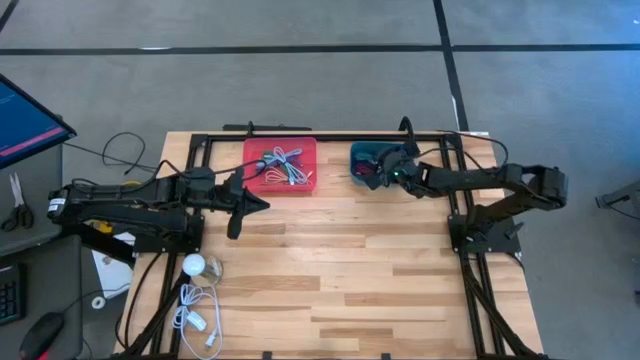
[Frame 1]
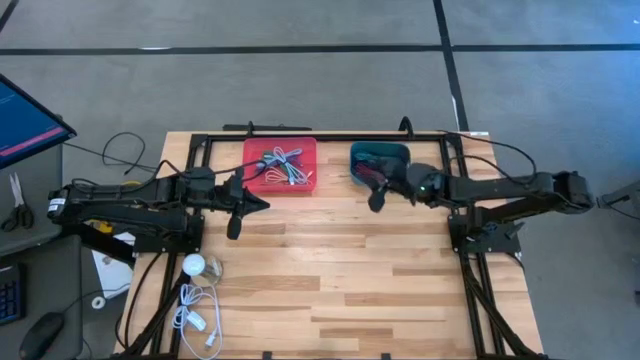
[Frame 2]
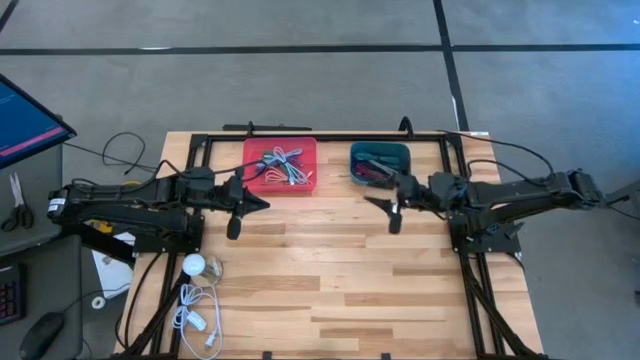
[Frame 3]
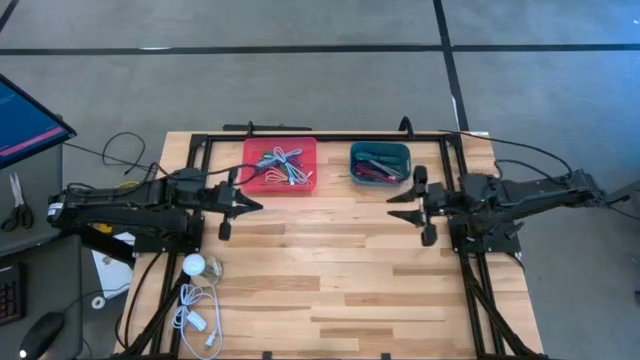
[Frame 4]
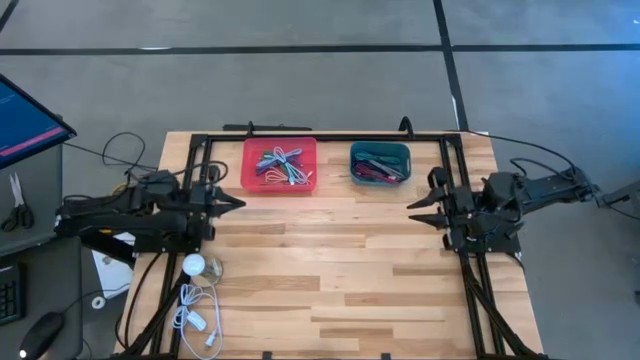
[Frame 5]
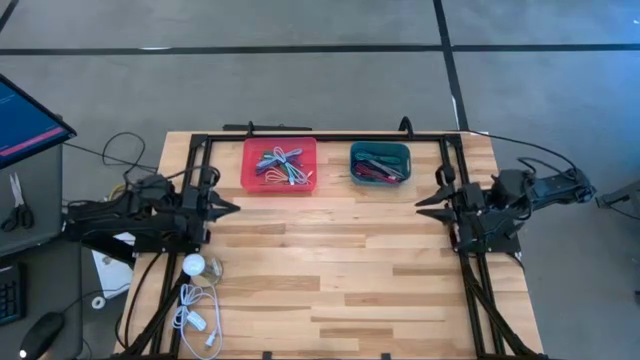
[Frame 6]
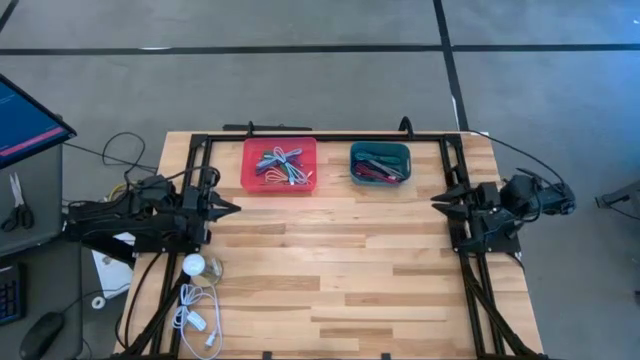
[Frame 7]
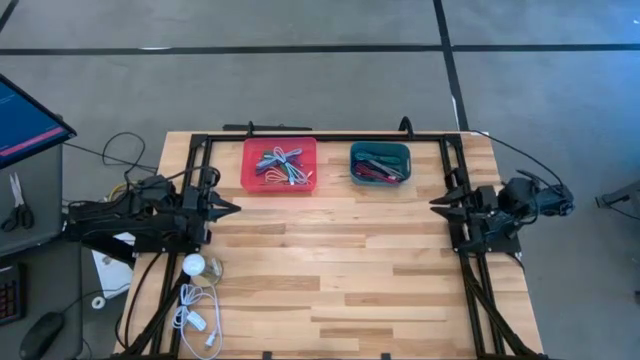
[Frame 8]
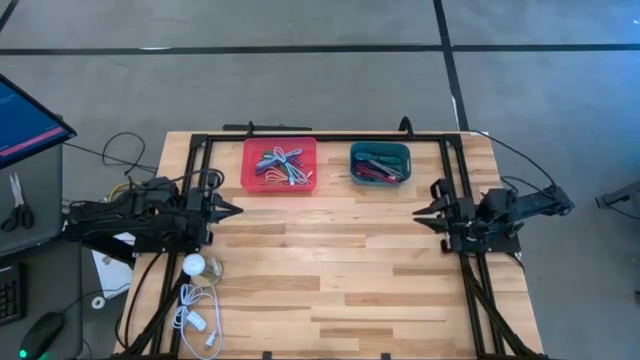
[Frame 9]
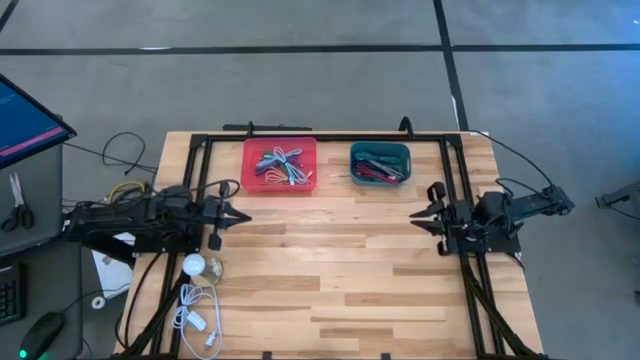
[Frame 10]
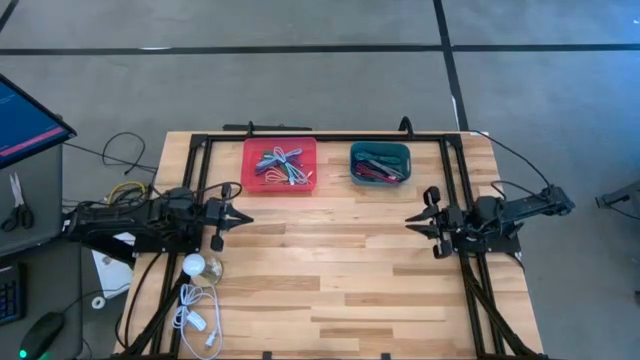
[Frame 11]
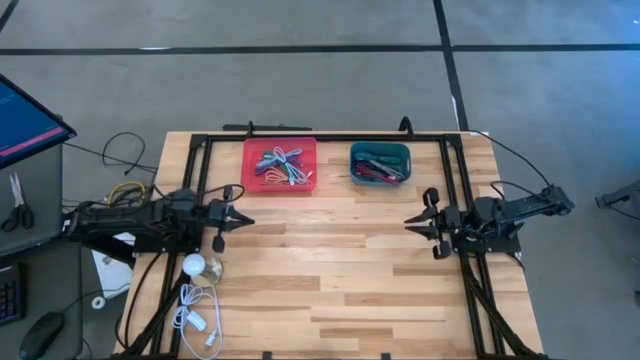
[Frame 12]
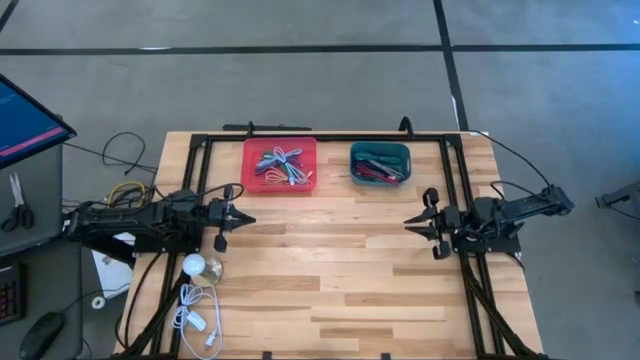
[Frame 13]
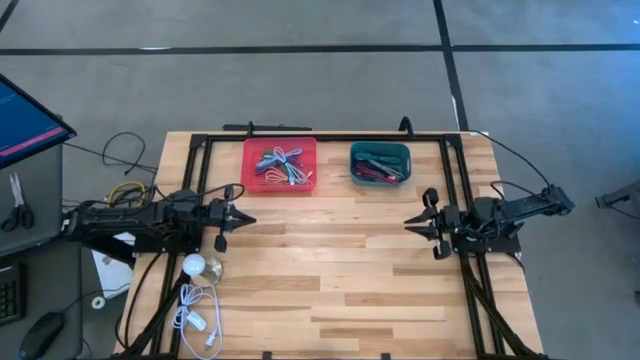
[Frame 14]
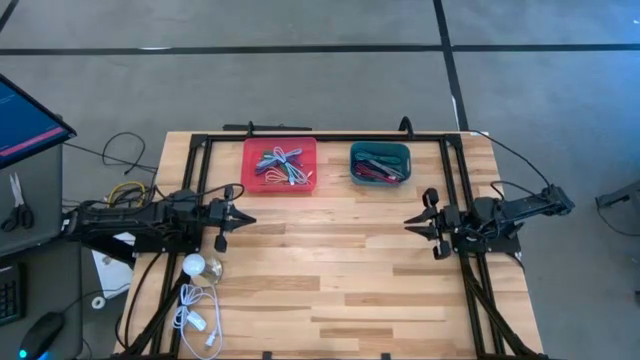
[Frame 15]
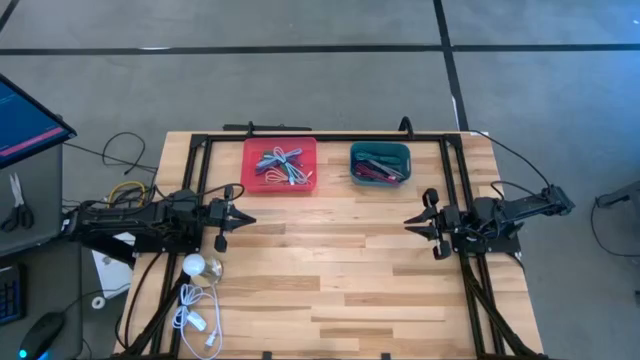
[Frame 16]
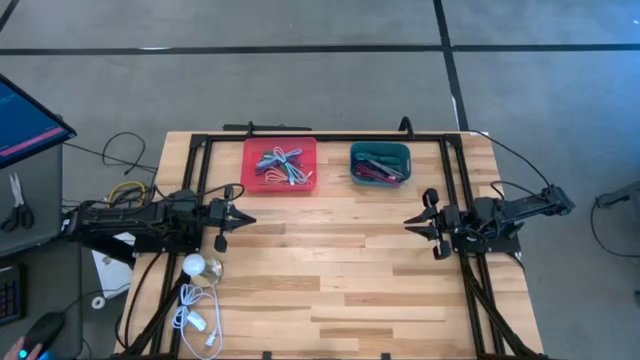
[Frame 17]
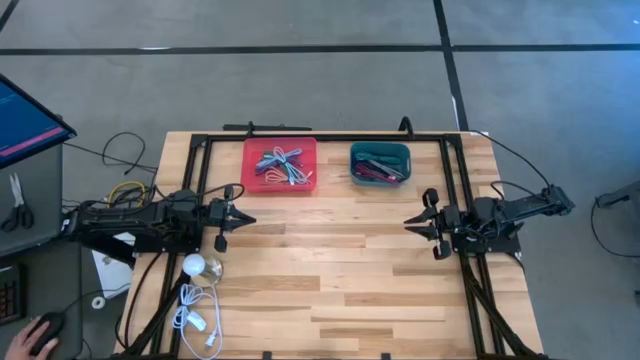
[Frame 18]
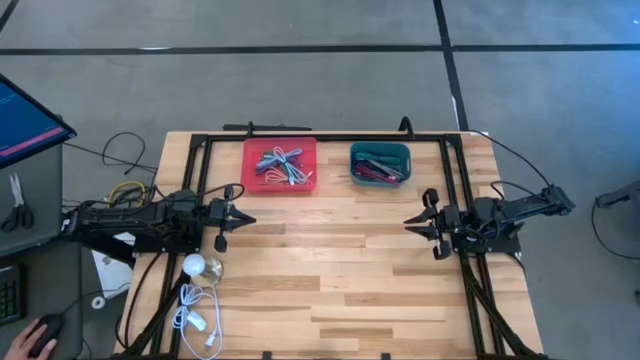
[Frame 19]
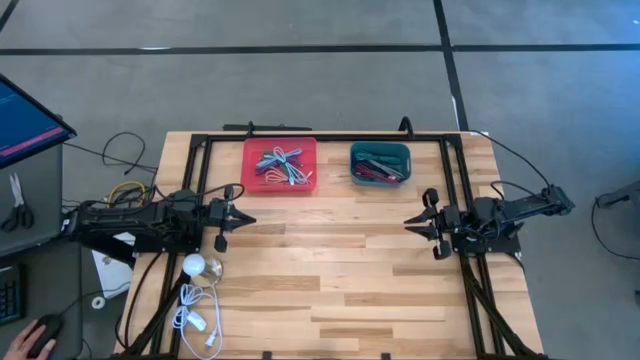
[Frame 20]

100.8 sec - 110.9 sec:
Task: Pick & Place USB Port
Return to Home Position

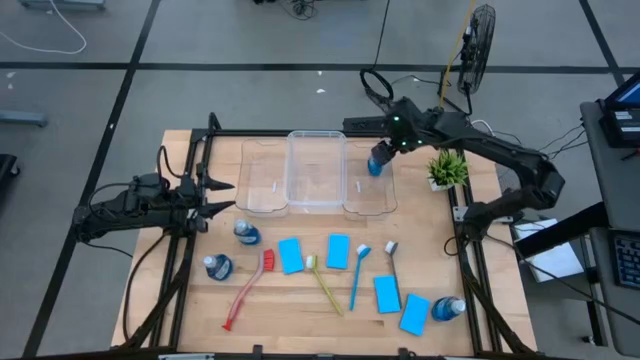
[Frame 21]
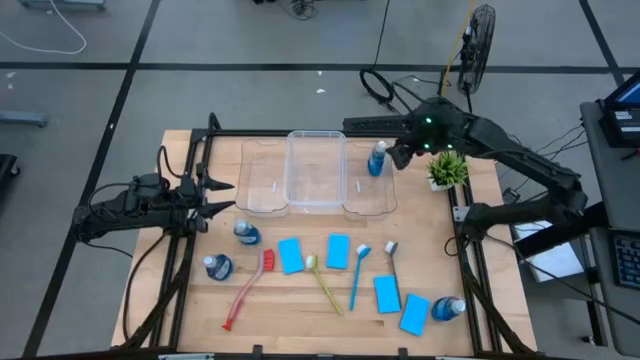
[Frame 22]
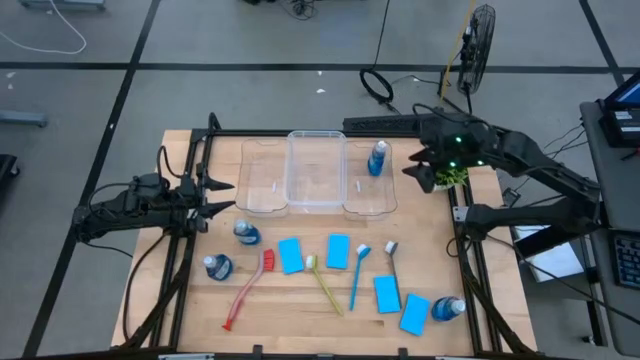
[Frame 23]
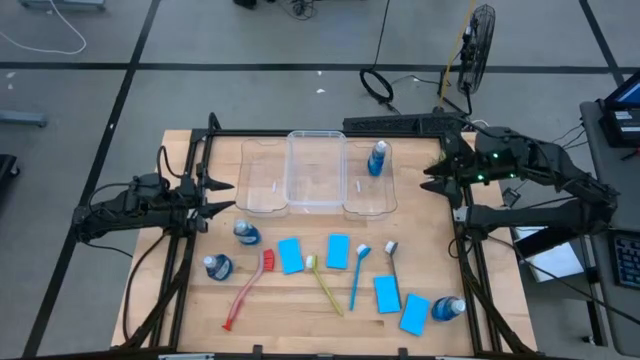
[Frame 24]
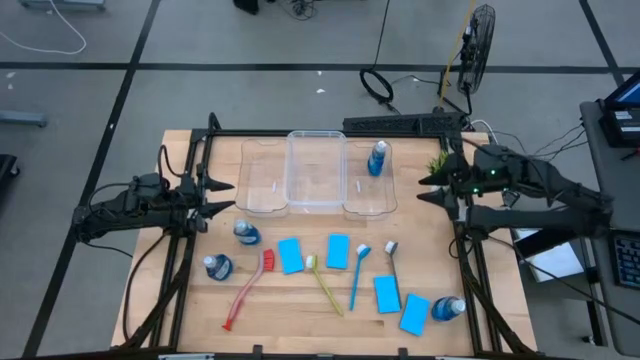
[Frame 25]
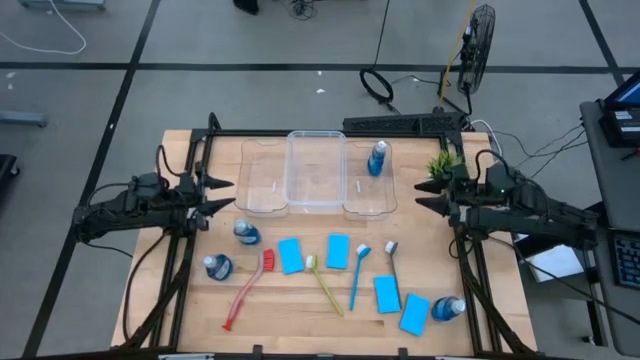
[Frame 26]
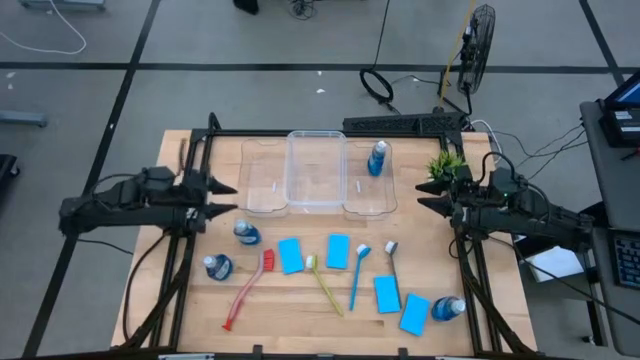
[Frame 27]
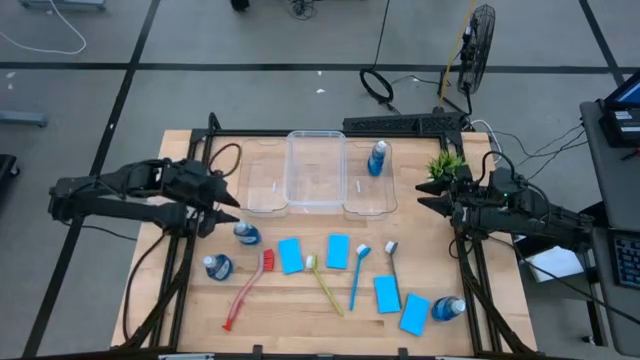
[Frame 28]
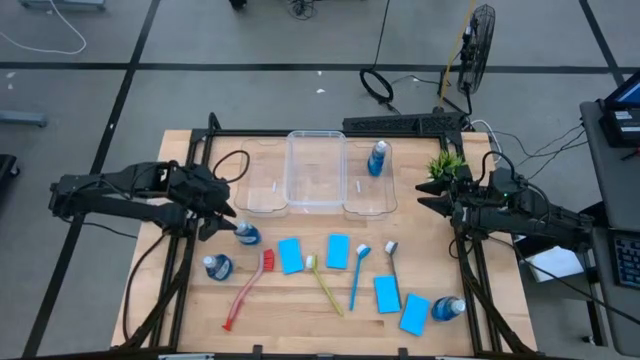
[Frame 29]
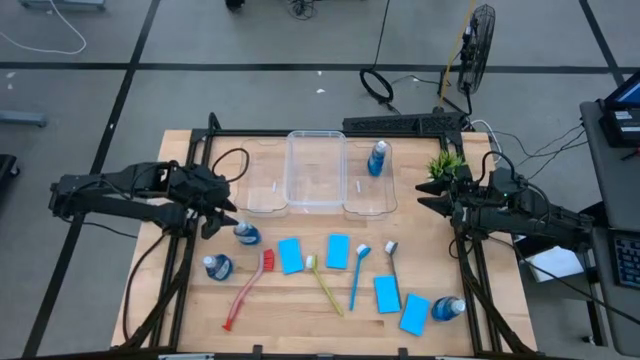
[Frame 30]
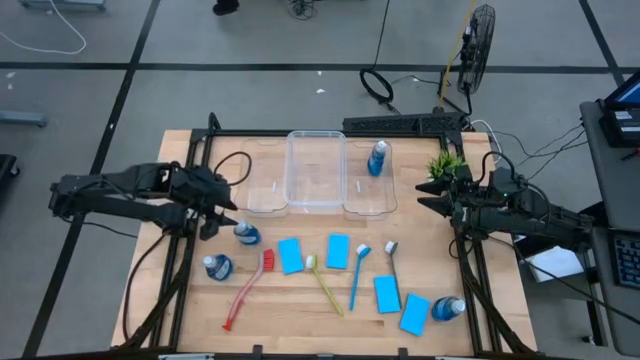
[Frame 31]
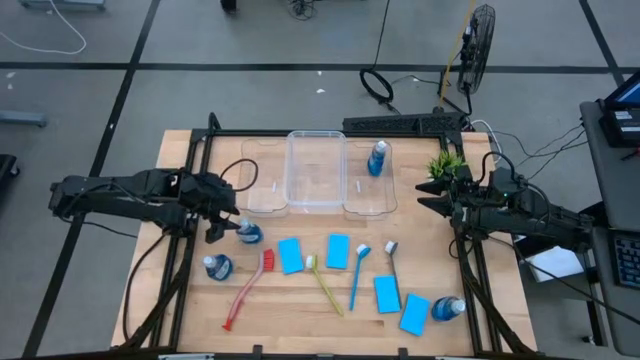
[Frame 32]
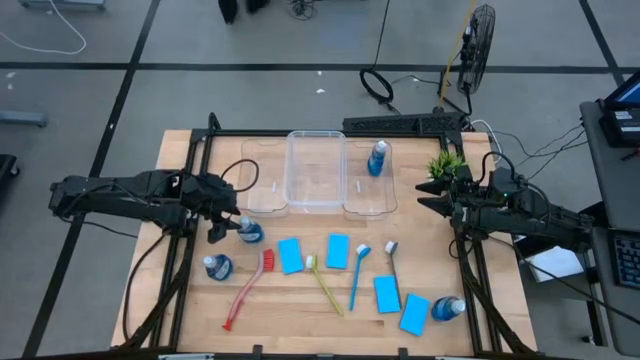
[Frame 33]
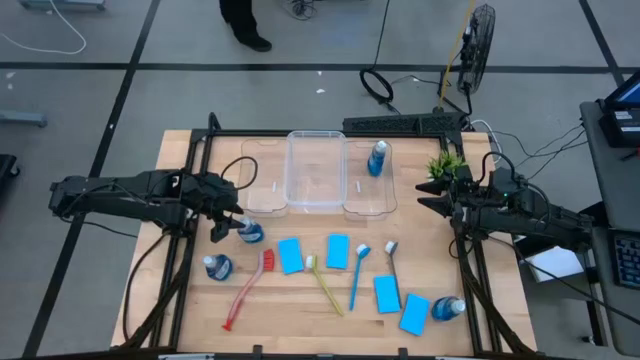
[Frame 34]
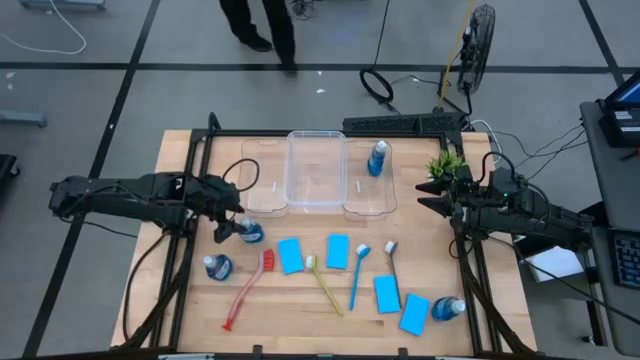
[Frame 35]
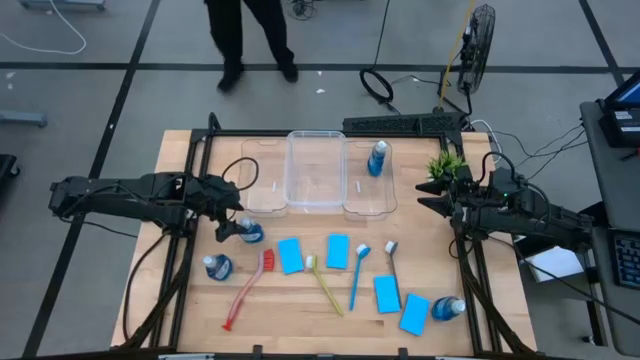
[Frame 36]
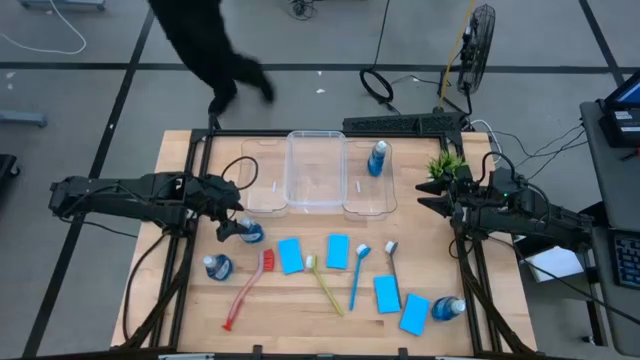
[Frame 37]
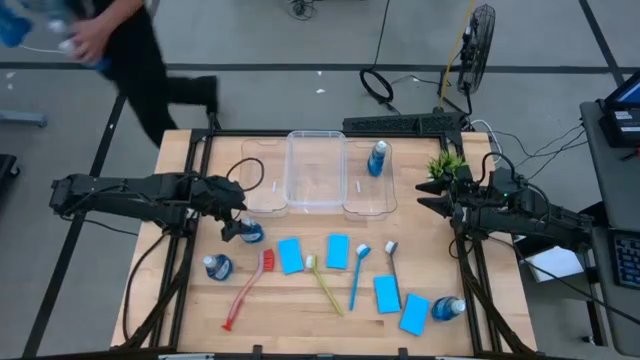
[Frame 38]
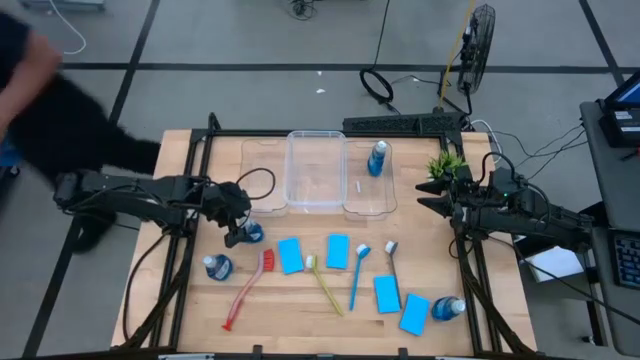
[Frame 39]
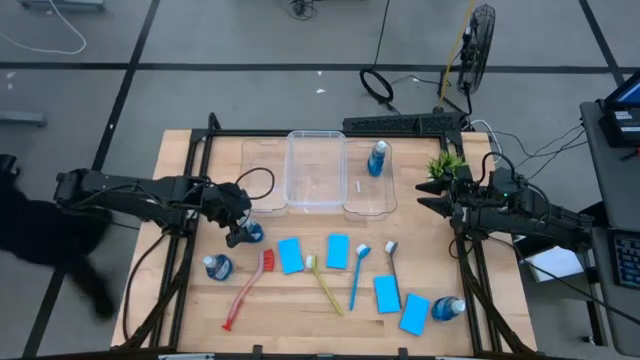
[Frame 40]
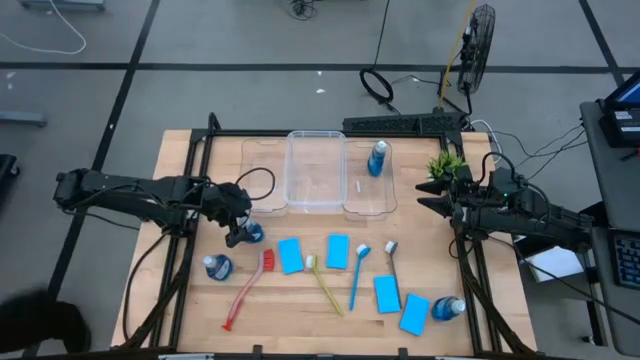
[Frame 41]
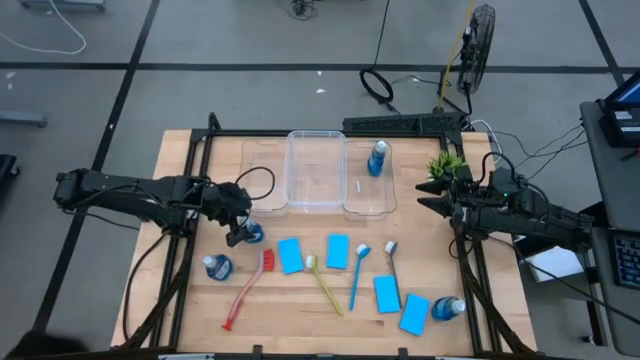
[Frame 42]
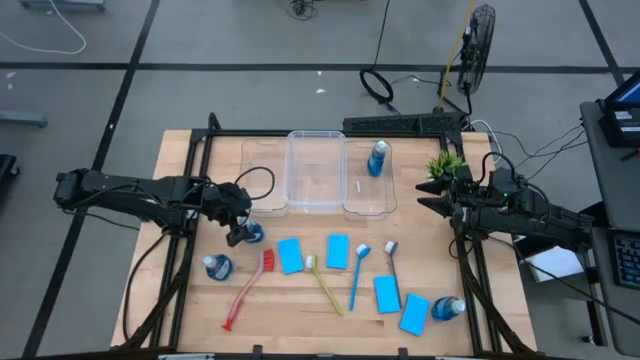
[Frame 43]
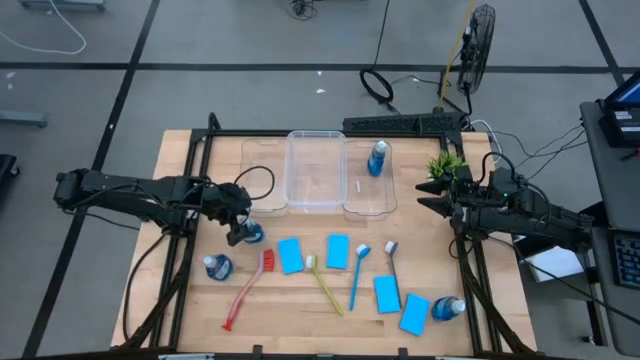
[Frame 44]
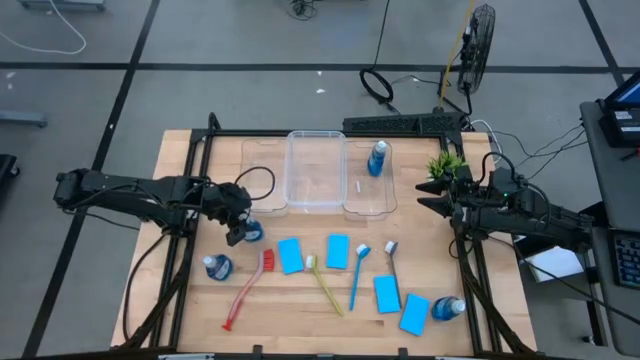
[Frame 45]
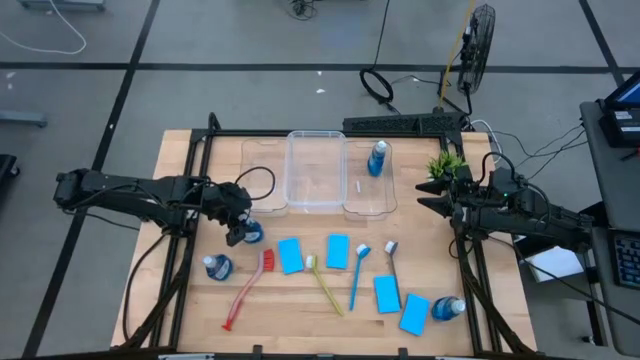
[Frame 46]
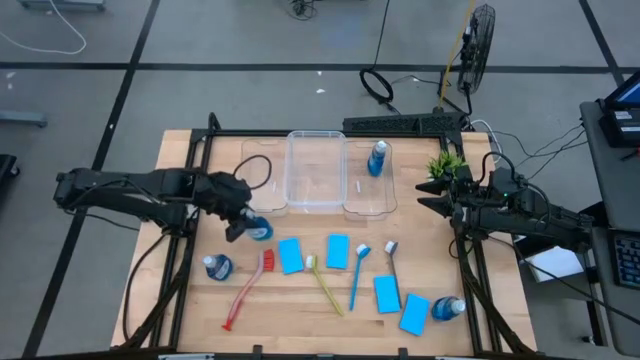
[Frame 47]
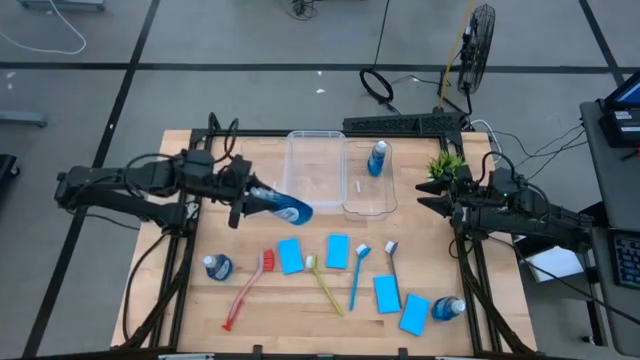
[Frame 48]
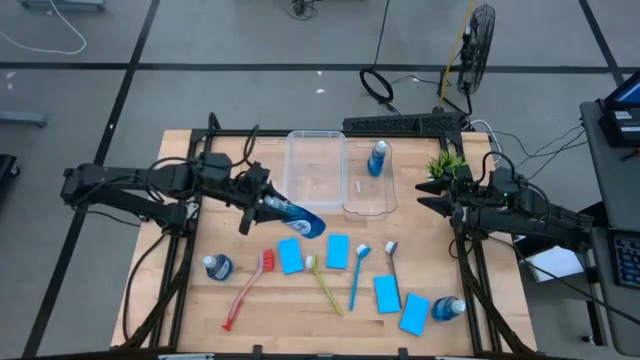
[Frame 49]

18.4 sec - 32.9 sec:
Task: Pick & Place Kitchen Sink Supplies
Put the blue dishwashing liquid into the right transparent bin
